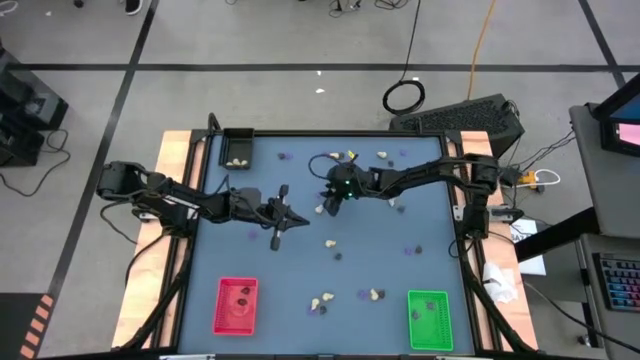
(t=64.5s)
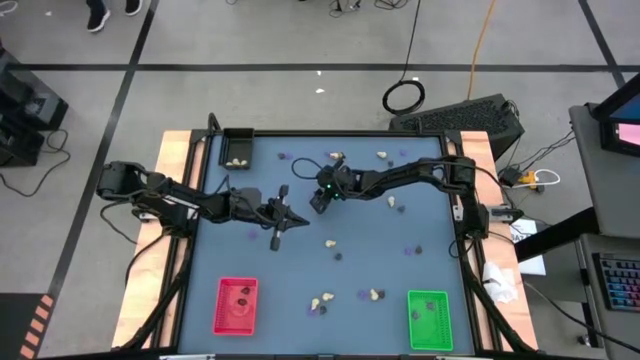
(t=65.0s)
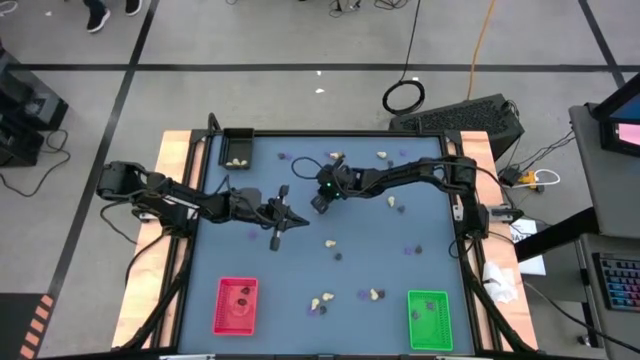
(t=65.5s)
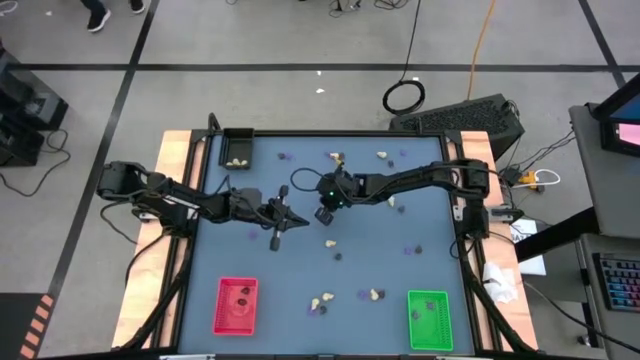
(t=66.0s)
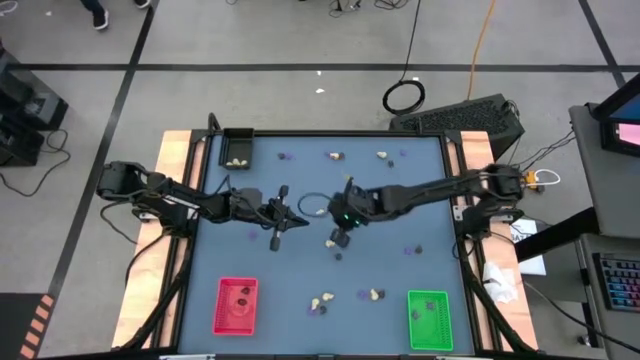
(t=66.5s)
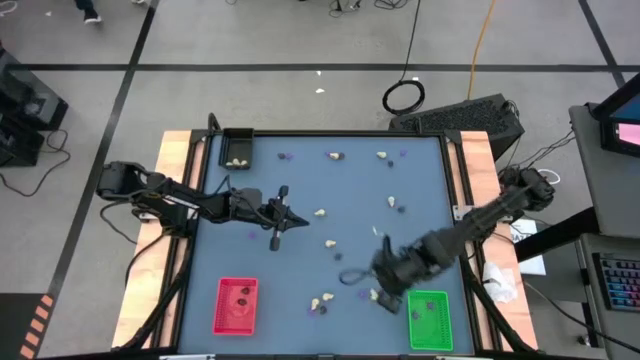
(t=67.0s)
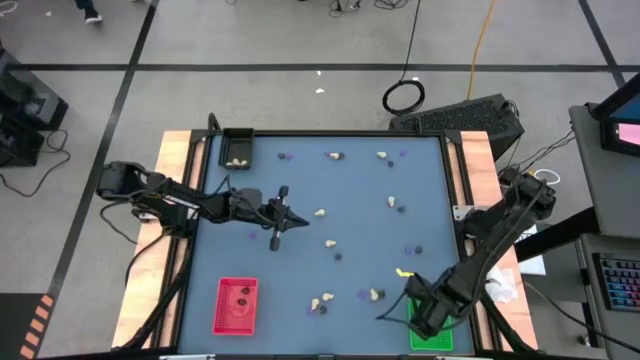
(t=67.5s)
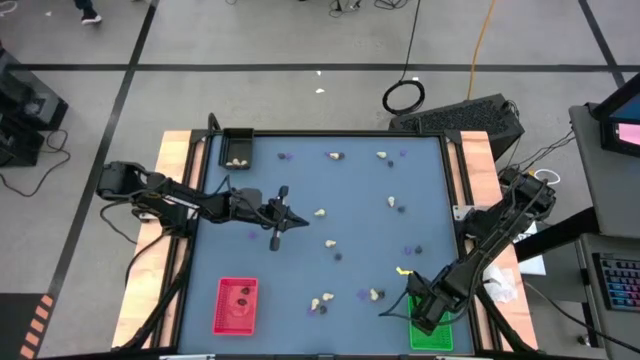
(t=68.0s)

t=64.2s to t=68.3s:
Task: Sort Halloween decoration
Put the violet spider toy into the green bin

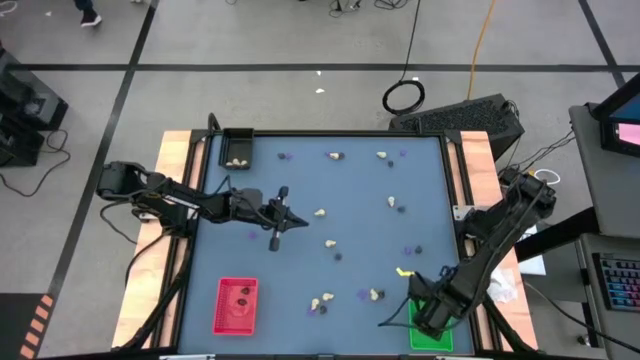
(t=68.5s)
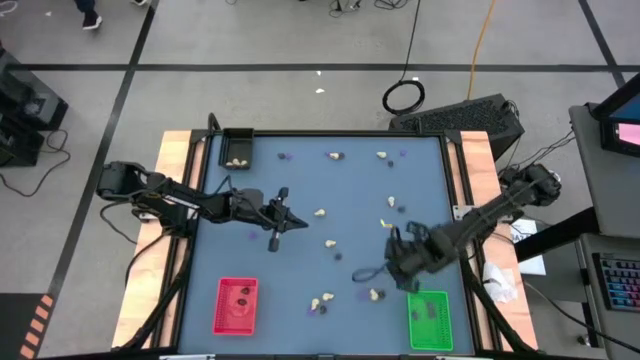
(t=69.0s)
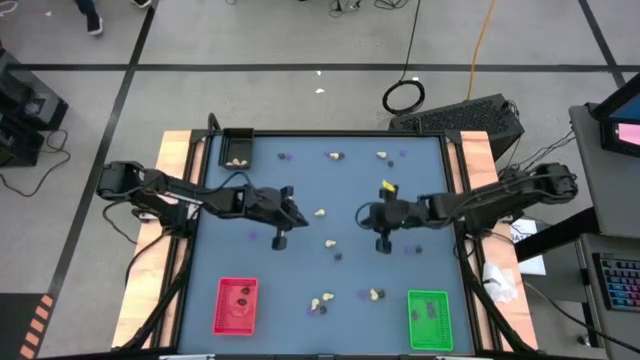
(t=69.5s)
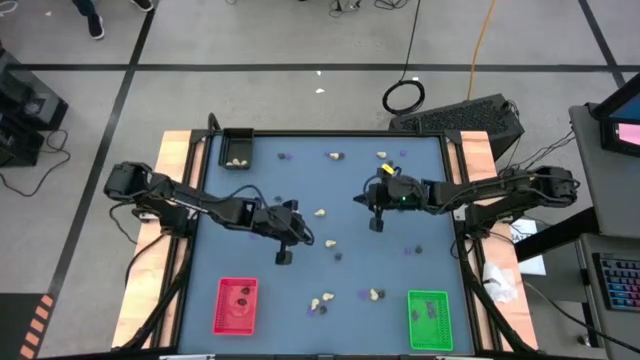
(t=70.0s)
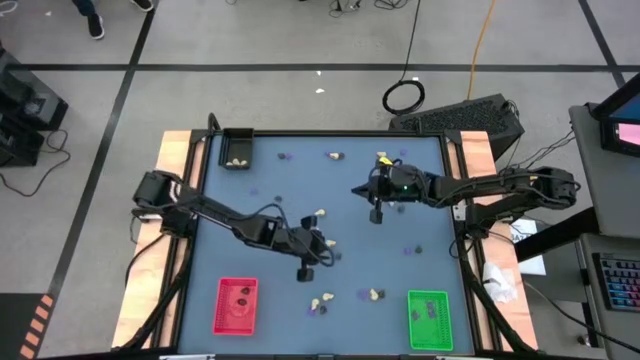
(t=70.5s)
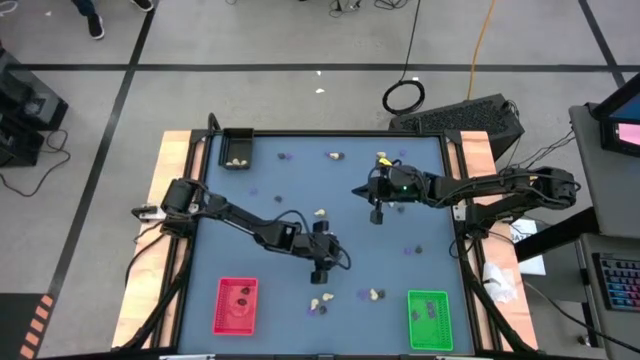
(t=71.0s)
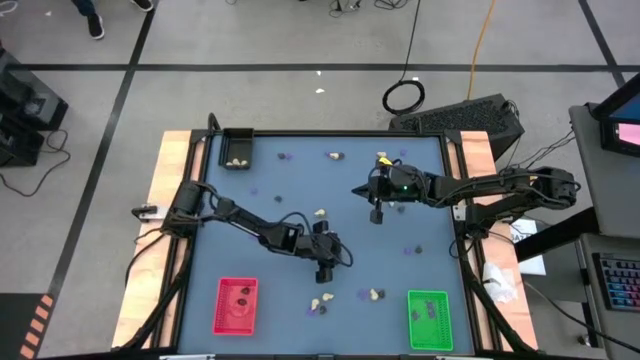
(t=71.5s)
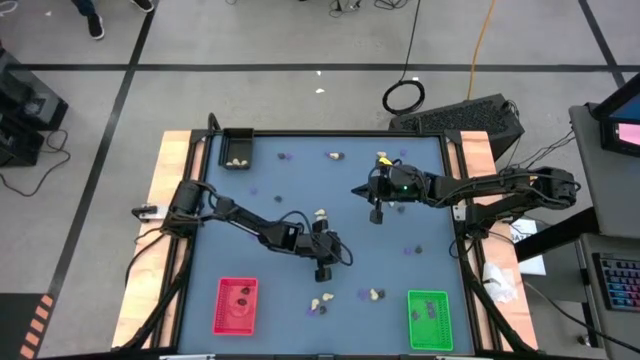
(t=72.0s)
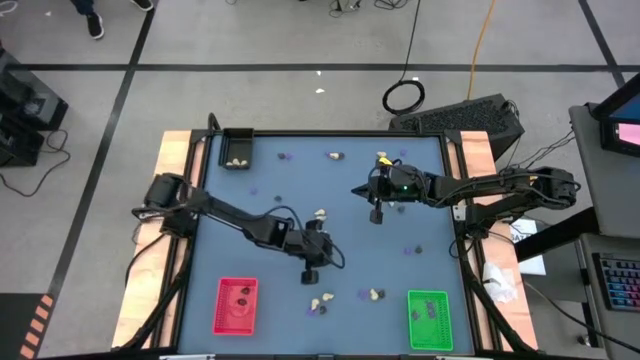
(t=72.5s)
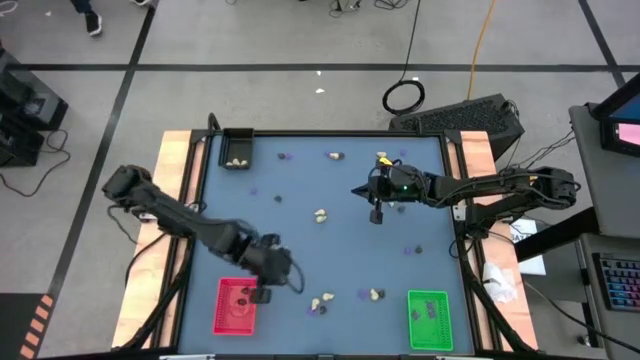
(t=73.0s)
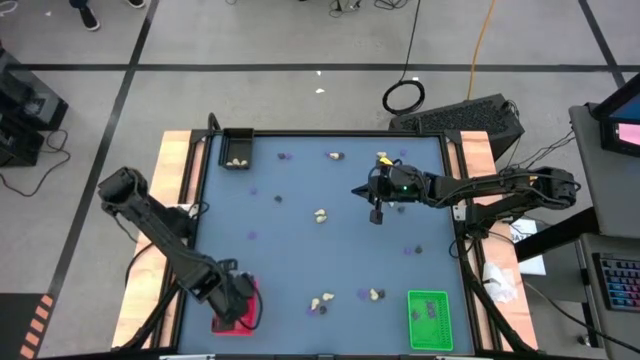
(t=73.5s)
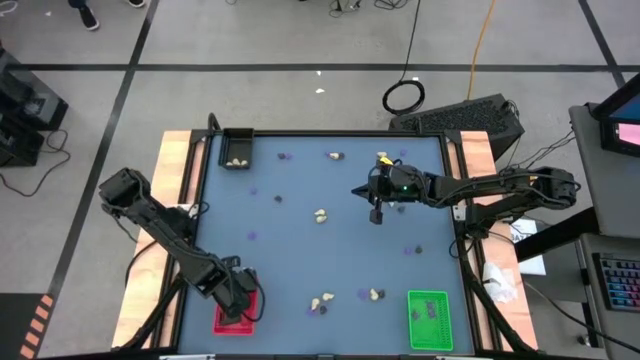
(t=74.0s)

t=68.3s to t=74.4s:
Put the black skull toy into the red bin

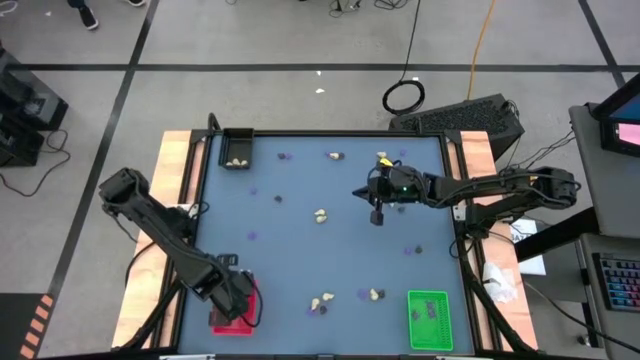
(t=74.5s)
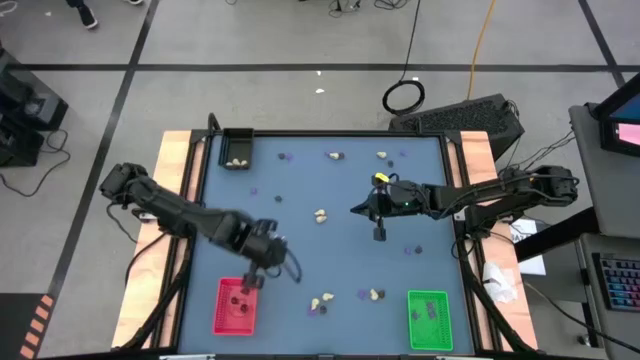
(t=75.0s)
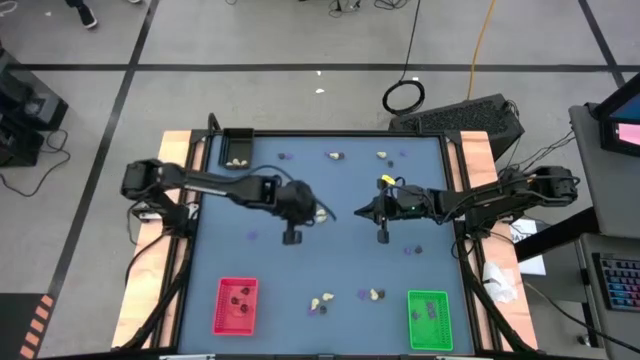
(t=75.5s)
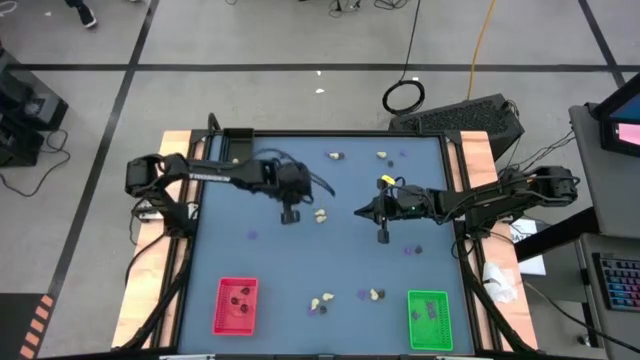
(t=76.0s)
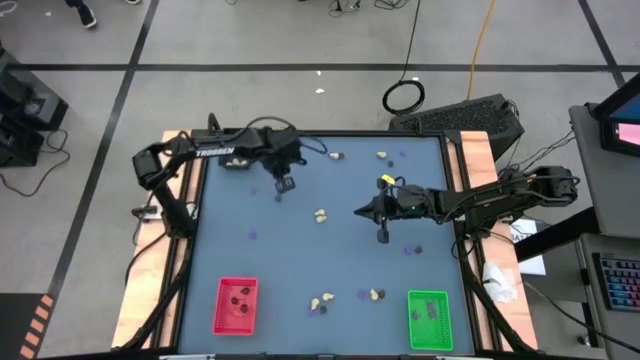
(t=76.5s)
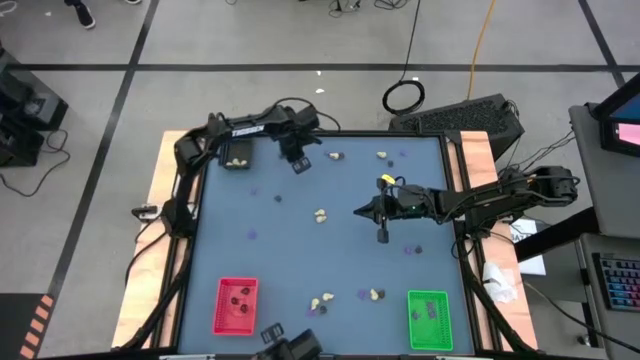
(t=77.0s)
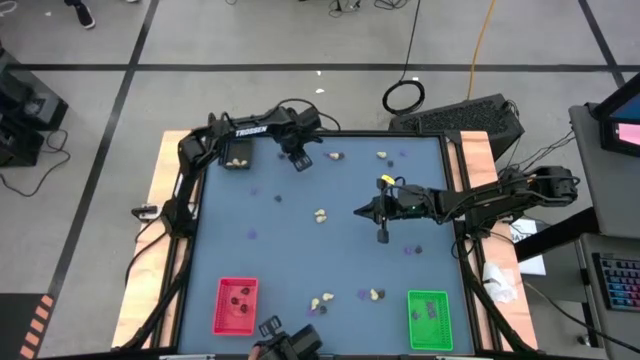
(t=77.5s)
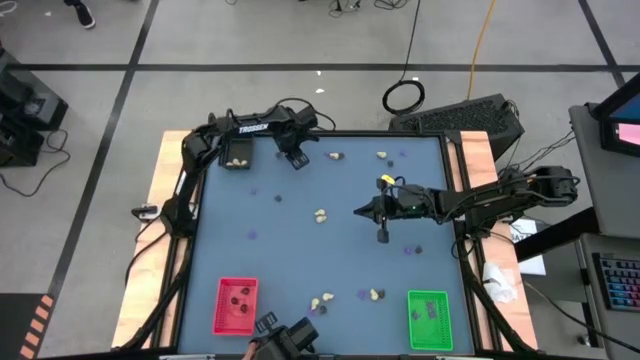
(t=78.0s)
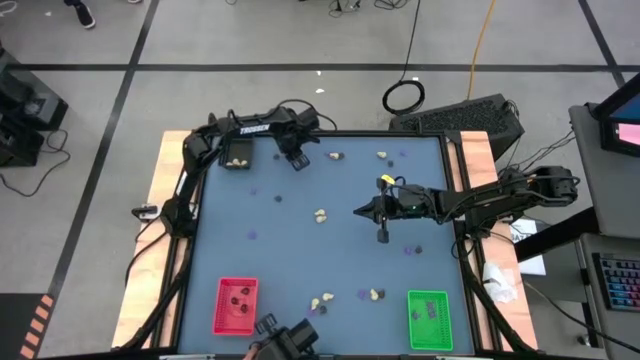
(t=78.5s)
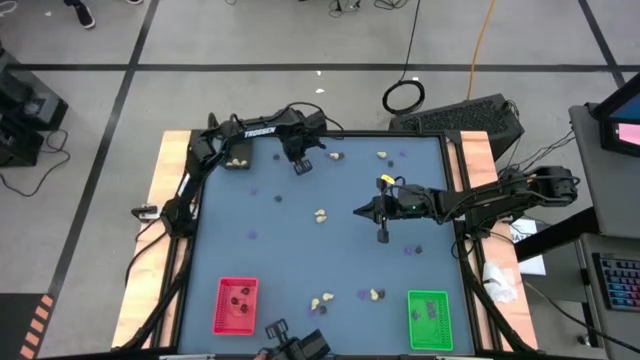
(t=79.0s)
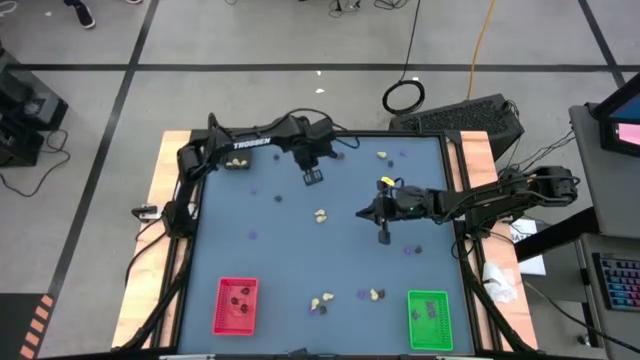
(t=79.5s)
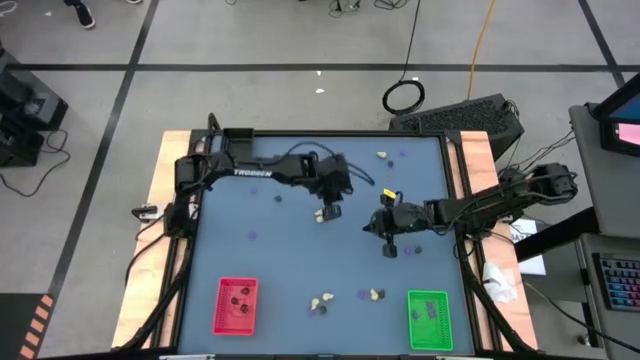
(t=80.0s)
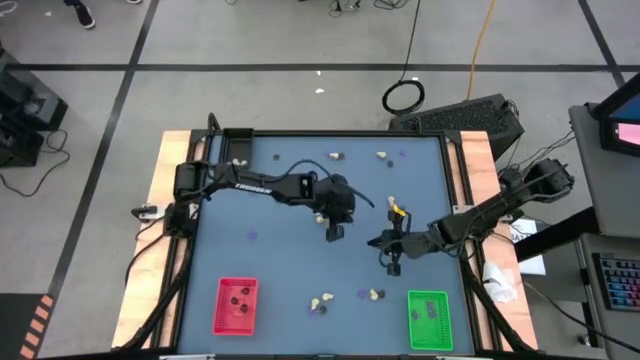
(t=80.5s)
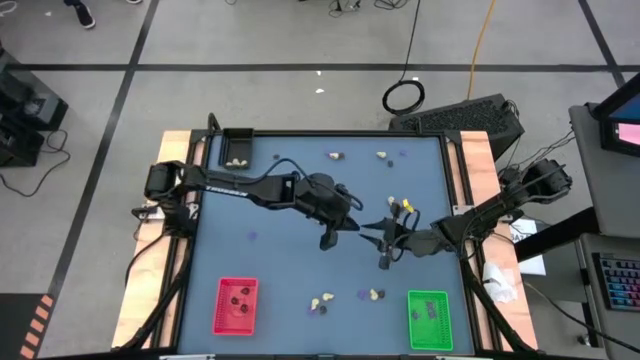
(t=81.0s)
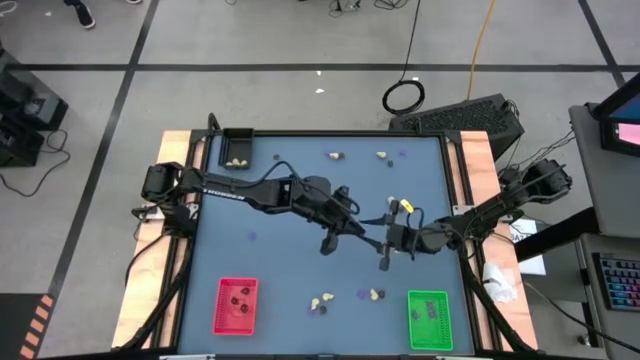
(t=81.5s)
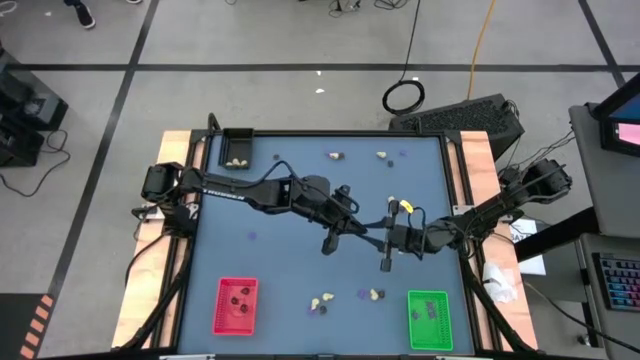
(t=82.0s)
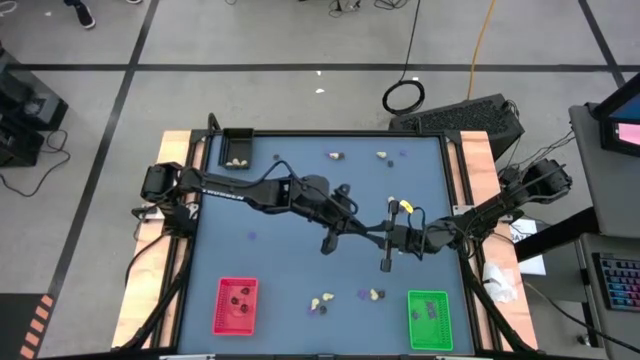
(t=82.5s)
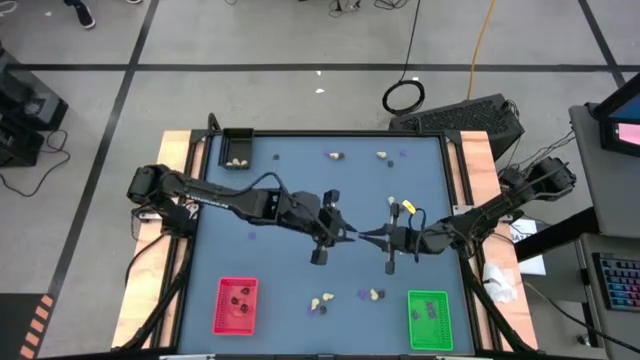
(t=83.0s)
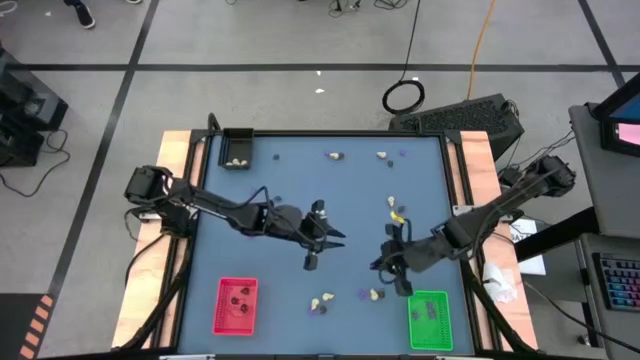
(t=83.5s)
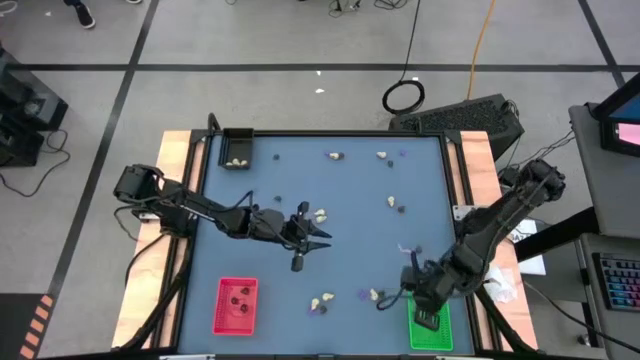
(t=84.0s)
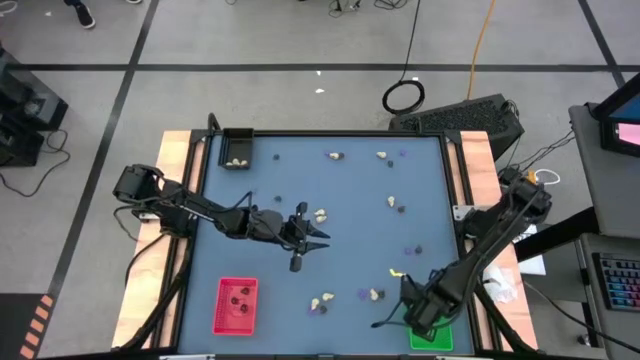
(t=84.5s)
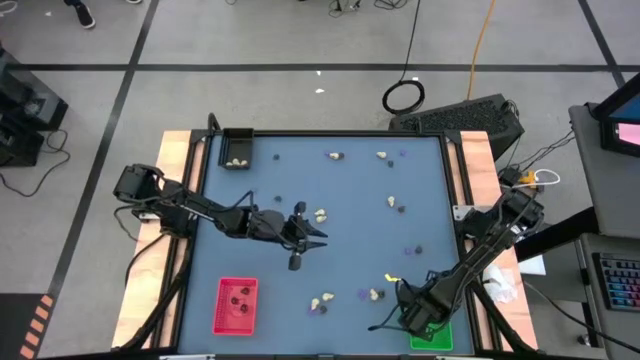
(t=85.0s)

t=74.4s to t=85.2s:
Put the violet spider toy into the green bin
